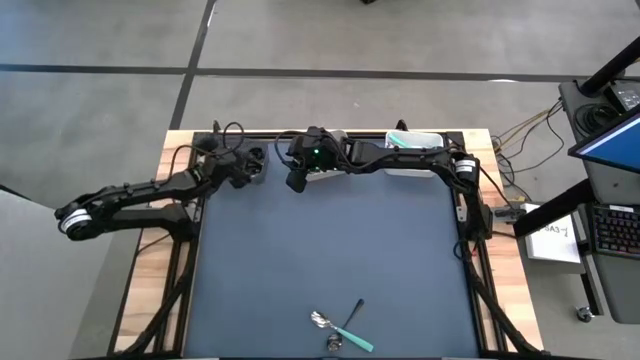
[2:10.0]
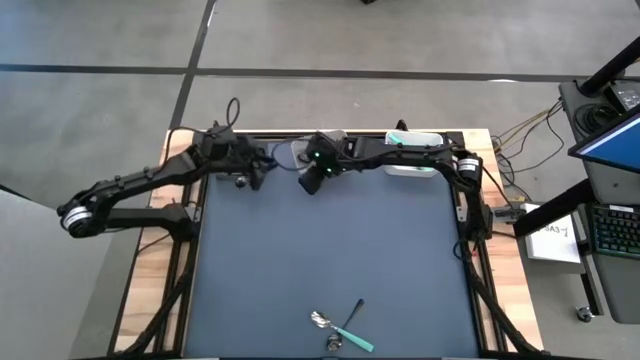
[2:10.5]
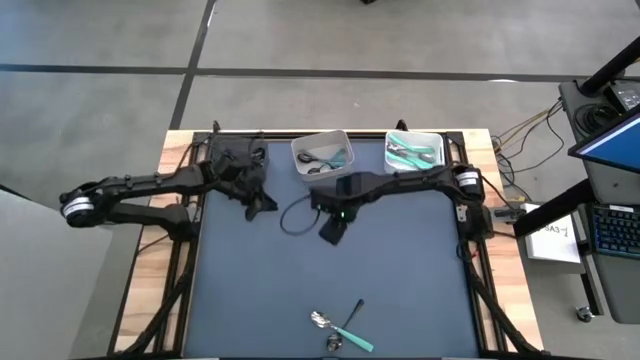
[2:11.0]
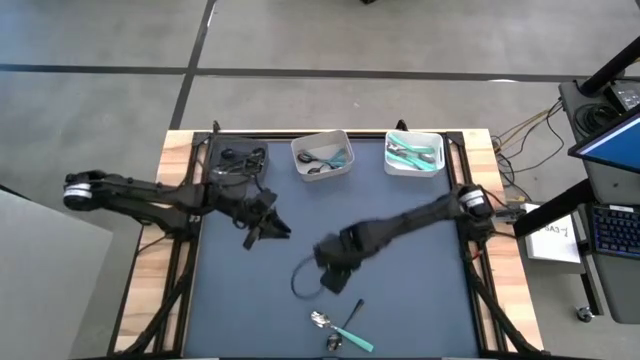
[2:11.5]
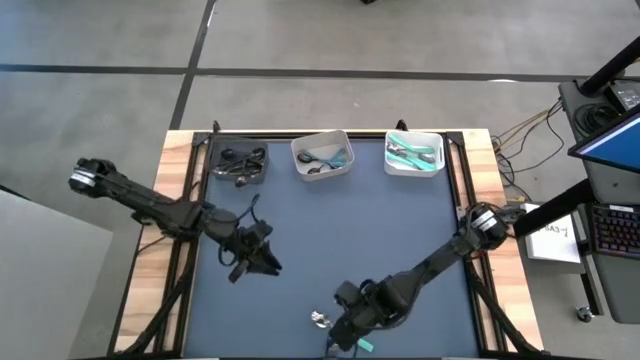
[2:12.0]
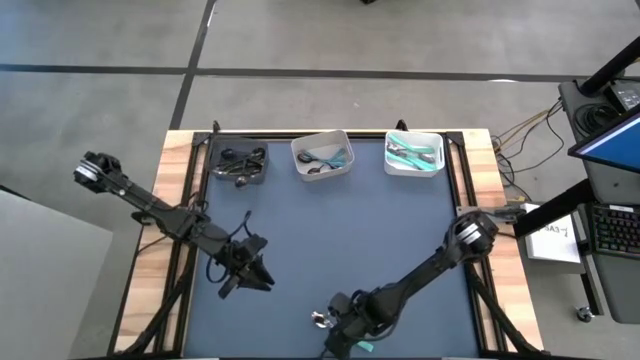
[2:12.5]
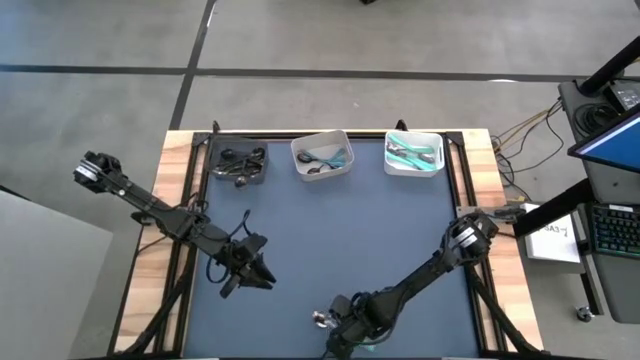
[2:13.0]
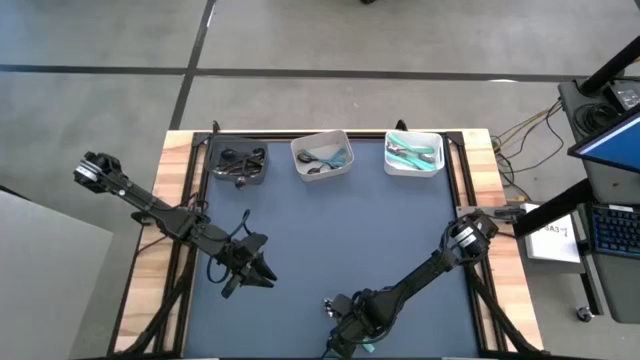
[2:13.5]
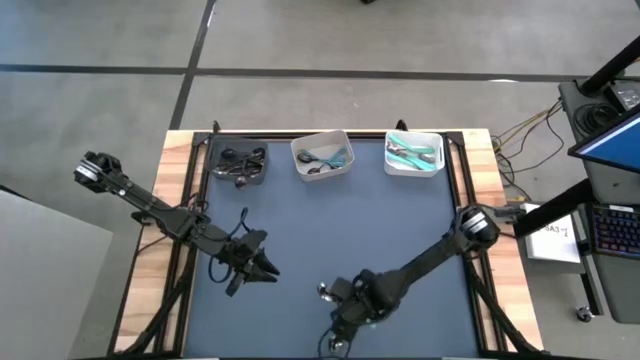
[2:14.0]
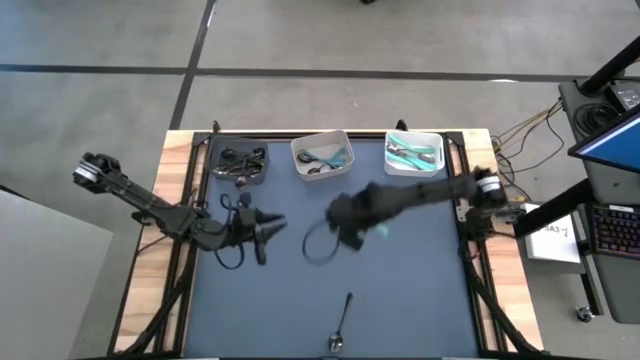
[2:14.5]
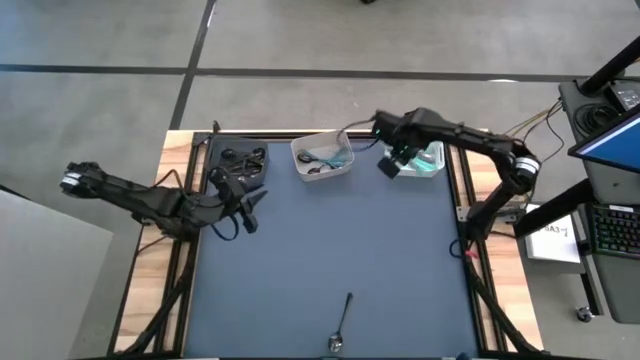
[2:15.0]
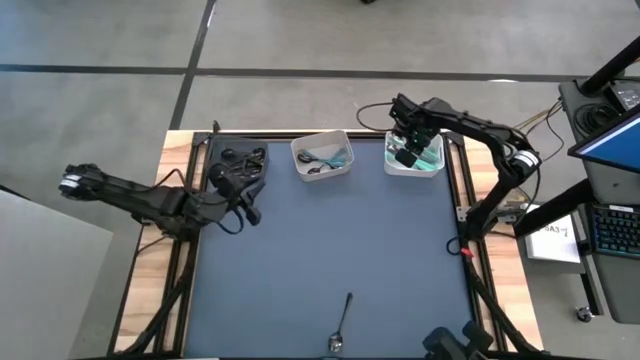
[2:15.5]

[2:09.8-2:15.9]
Task: Sort silverware by color (type)
Put the light blue spoon into the white bin

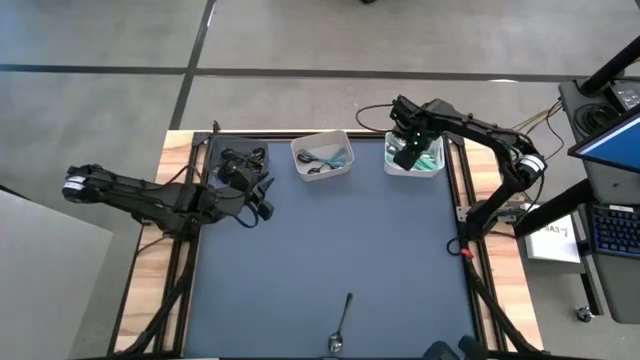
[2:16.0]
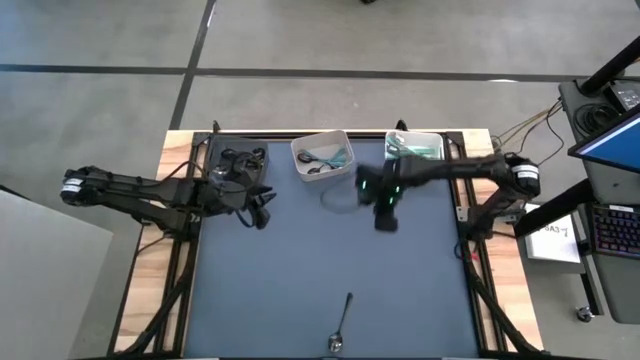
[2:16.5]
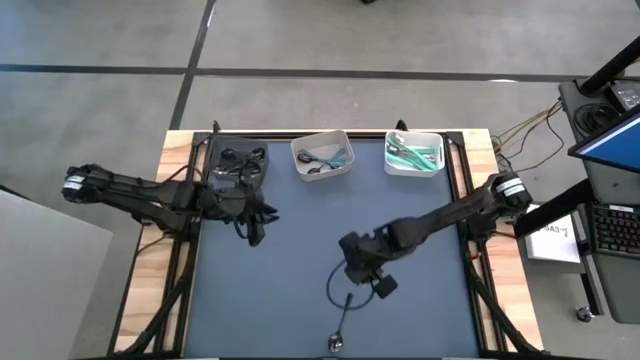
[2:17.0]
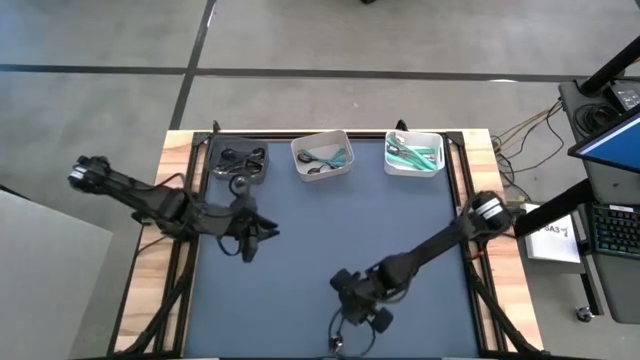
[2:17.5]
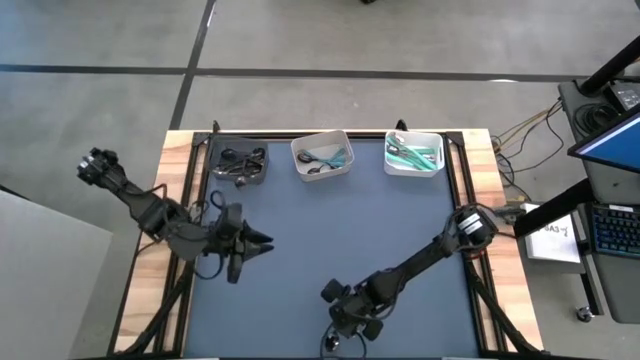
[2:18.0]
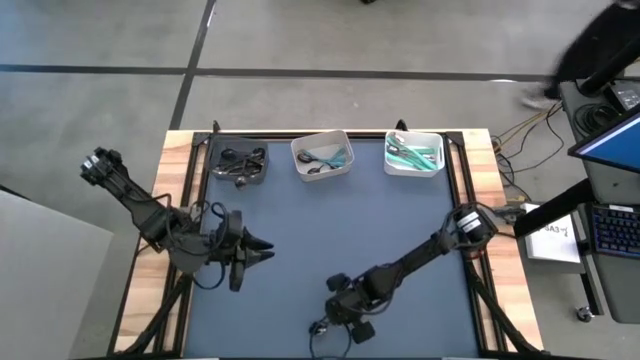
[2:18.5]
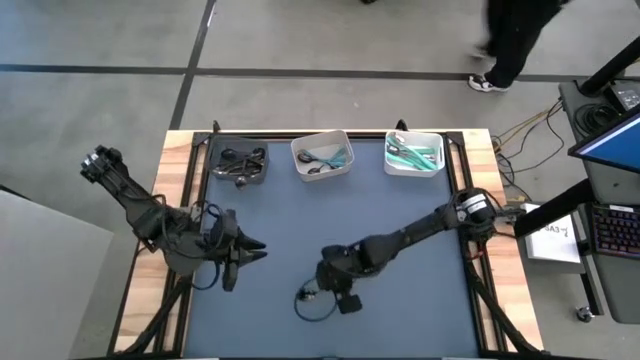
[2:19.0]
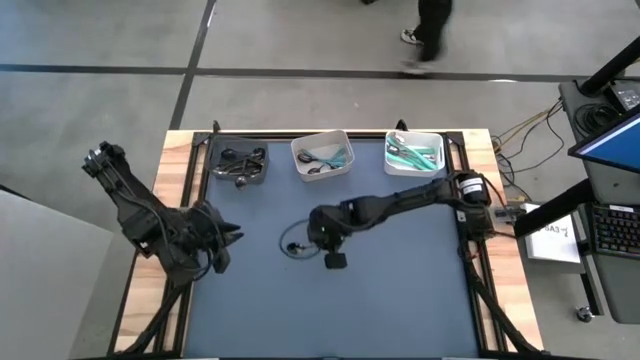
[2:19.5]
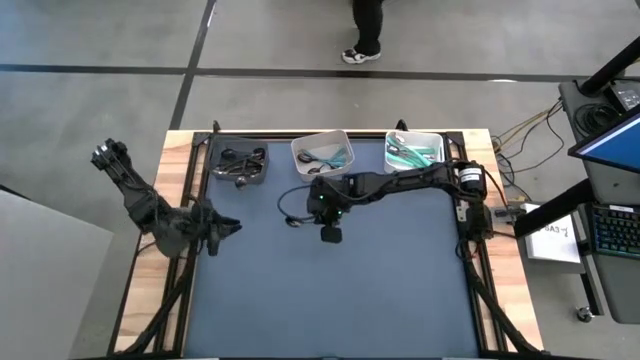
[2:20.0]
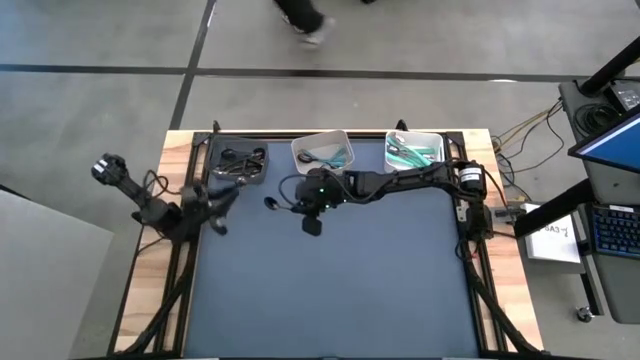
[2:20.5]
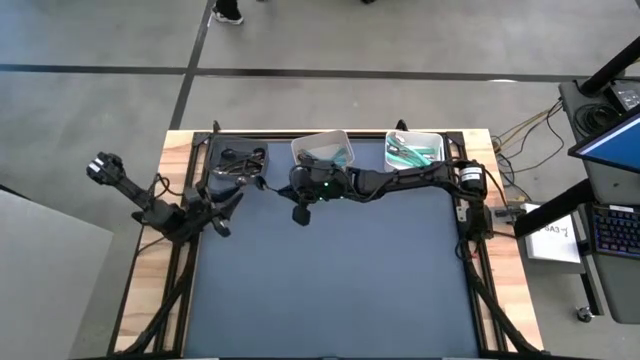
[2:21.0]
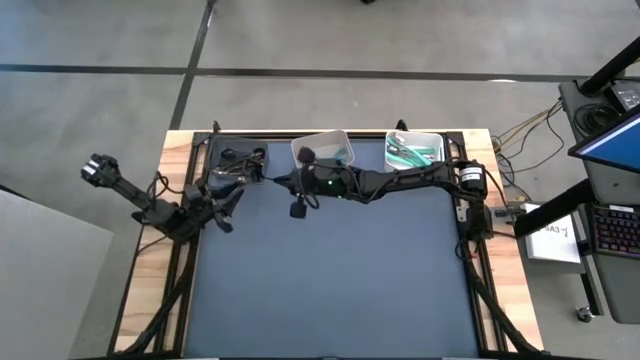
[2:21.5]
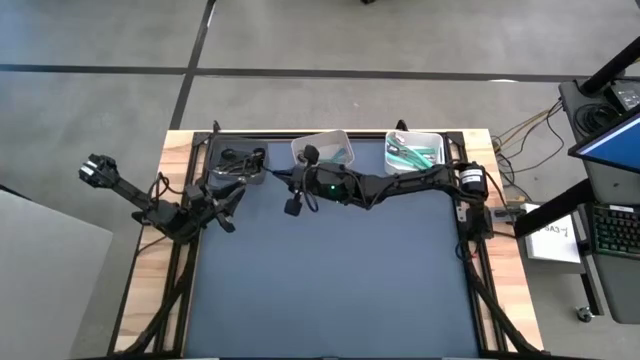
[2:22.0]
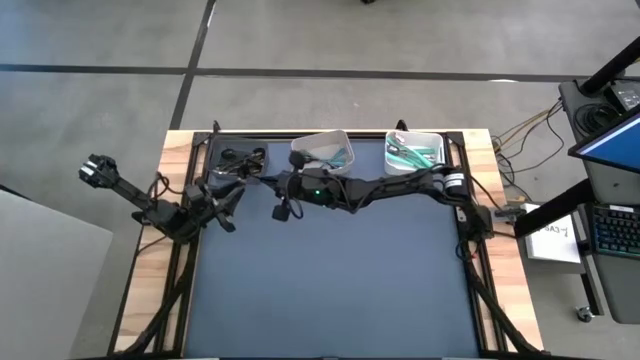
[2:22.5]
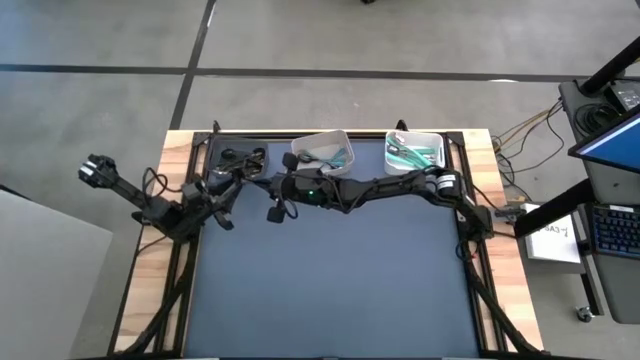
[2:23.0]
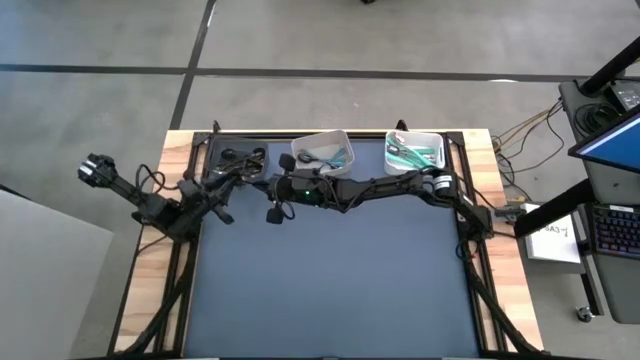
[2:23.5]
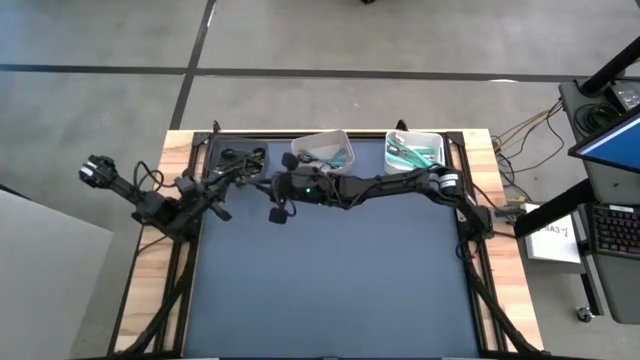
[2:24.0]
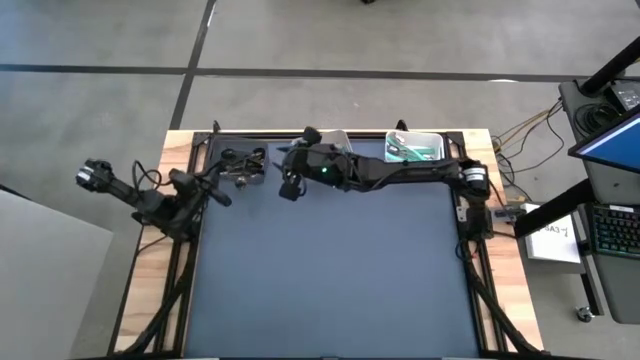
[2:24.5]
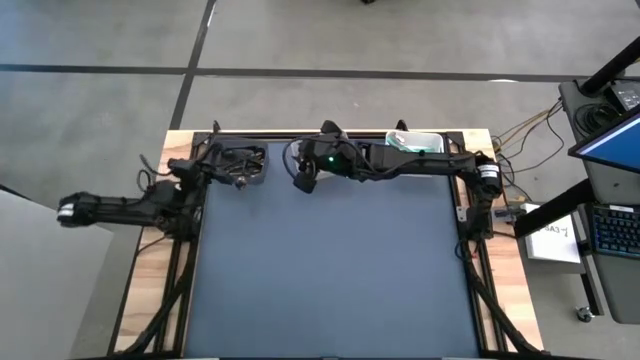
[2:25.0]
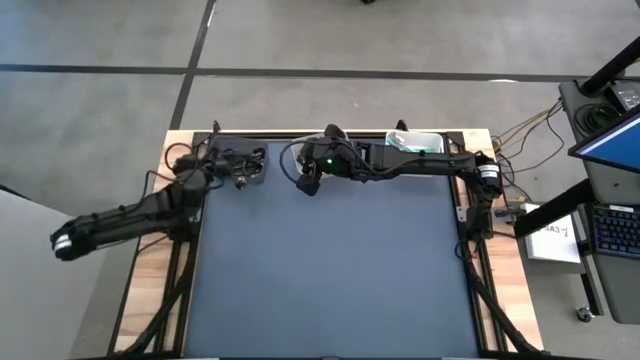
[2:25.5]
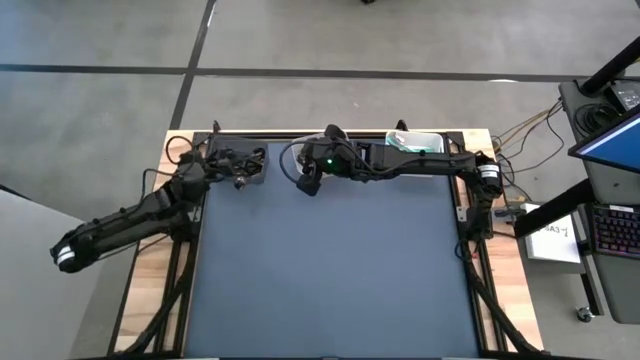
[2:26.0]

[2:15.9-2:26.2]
Put the black spoon into the black bin

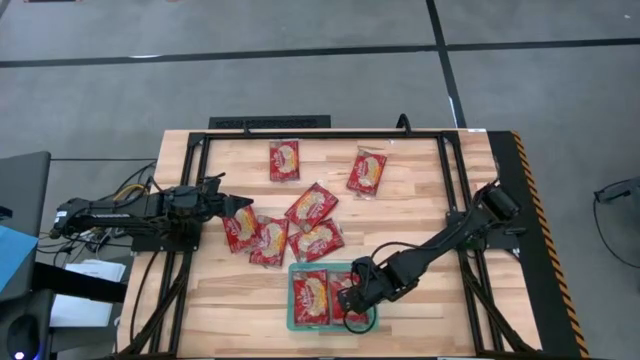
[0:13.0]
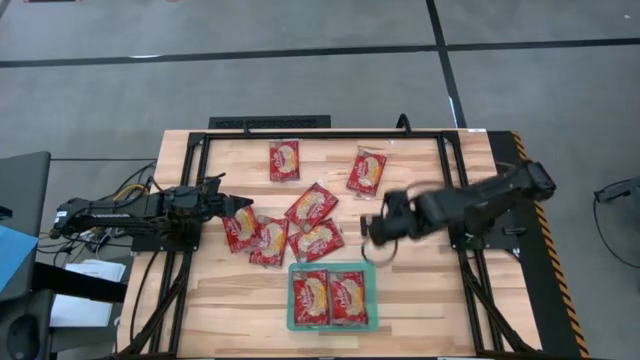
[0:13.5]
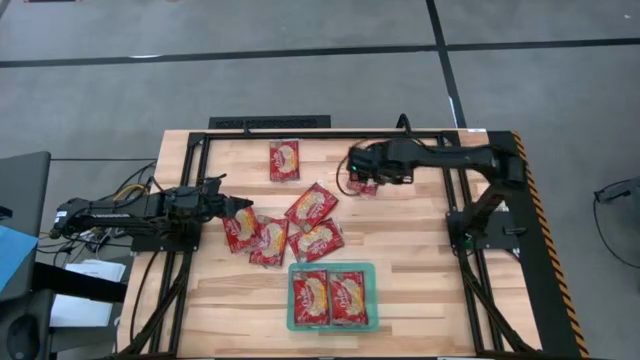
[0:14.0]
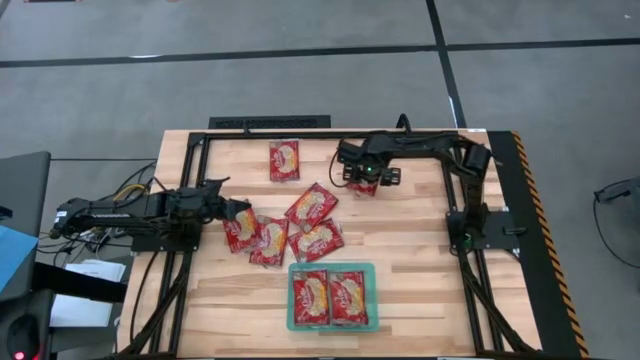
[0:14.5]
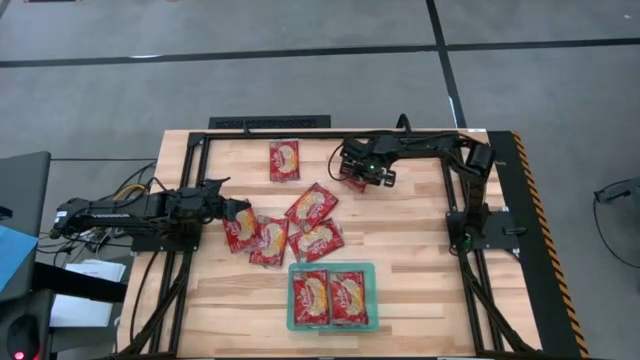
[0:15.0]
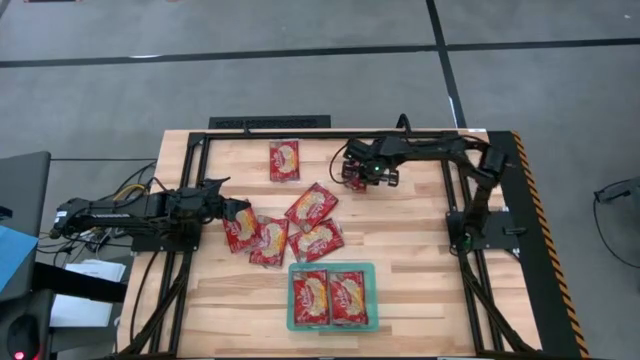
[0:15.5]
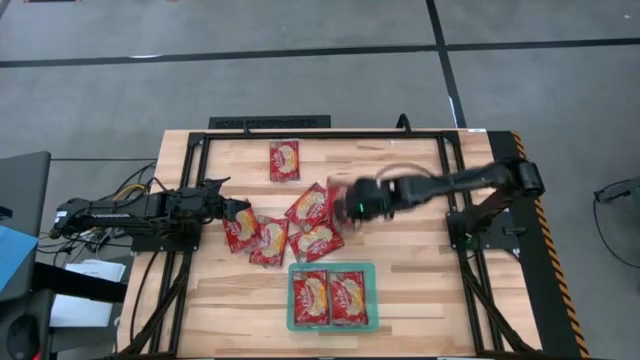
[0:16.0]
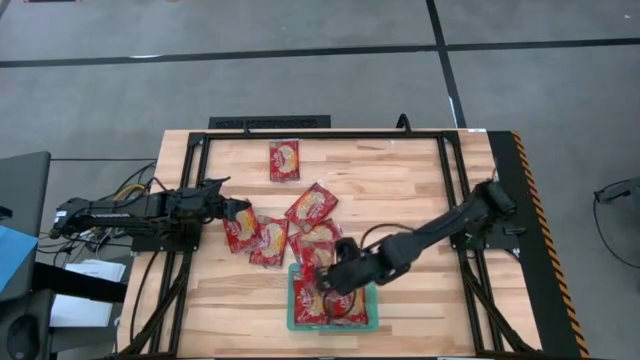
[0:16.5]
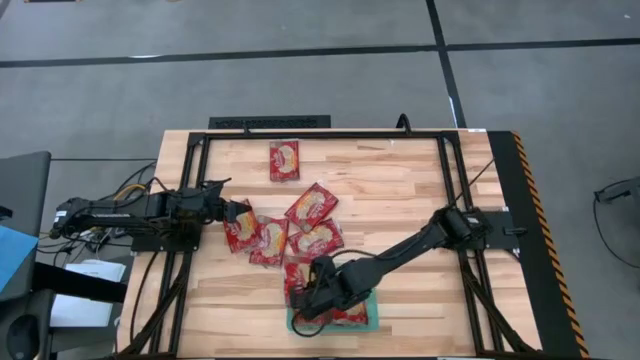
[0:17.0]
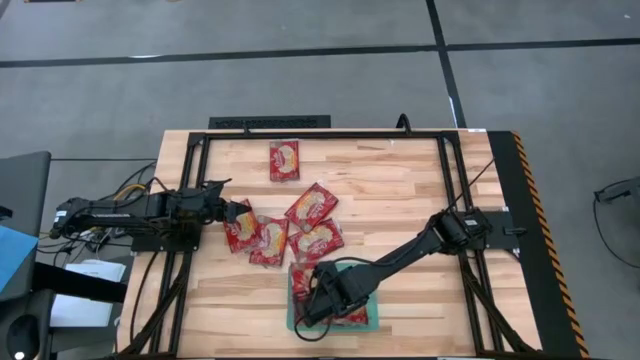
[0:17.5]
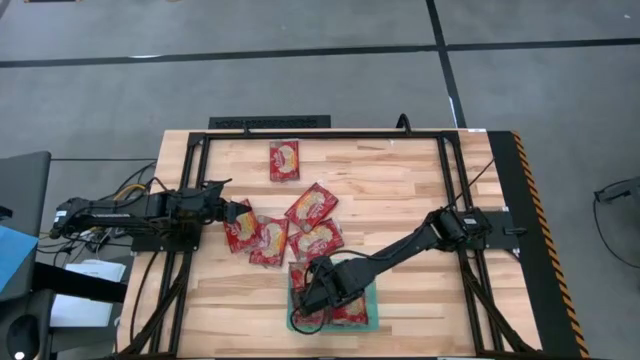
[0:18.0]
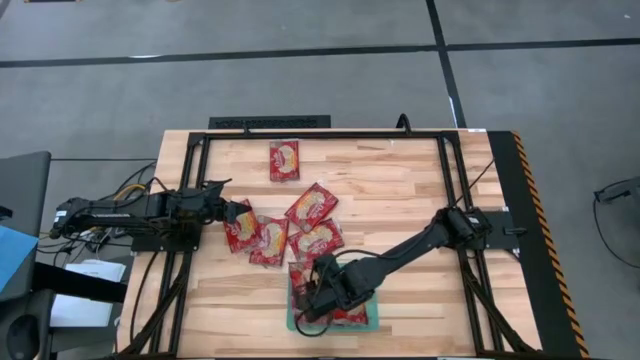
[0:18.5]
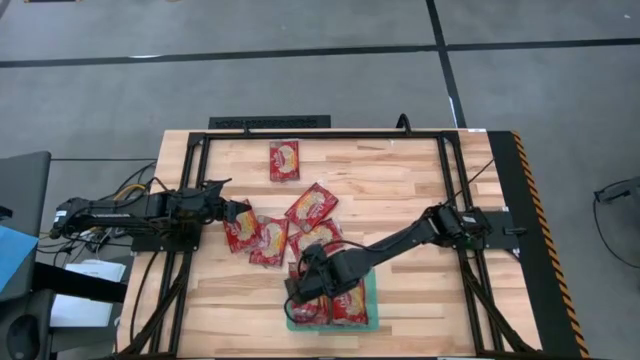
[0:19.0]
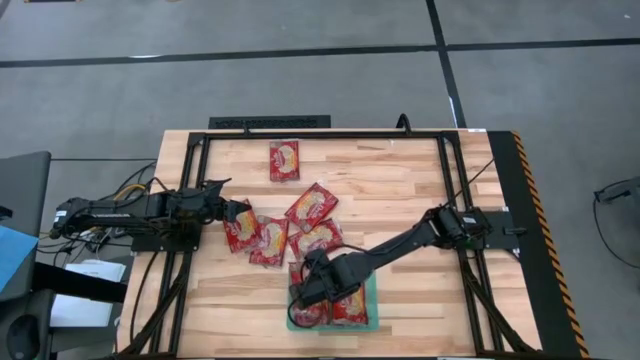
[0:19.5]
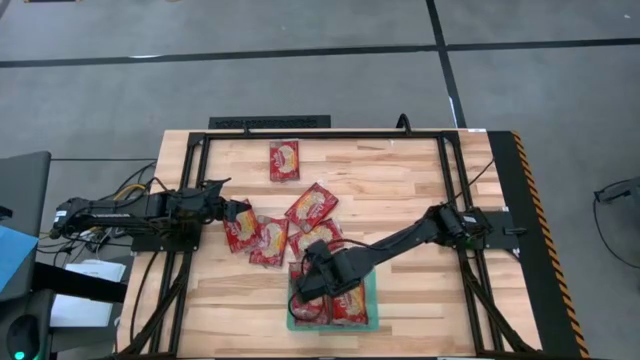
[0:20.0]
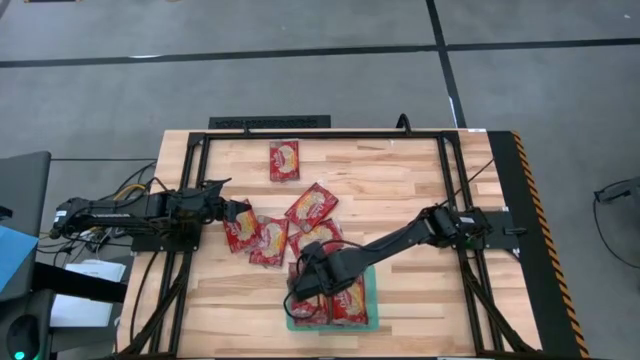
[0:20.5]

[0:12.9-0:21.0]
Task: Sort popcorn bags into baskets
Put the red popcorn bag into the green bin
